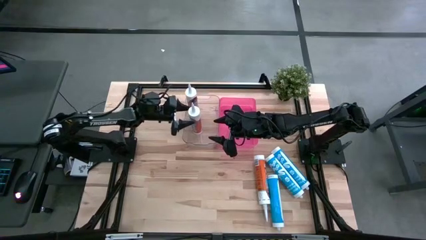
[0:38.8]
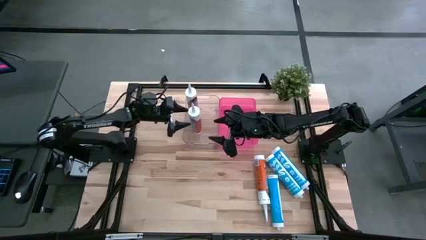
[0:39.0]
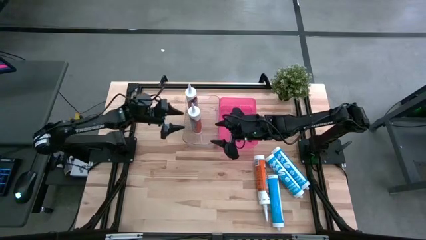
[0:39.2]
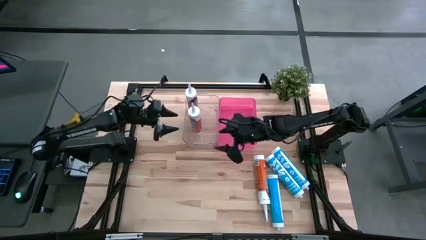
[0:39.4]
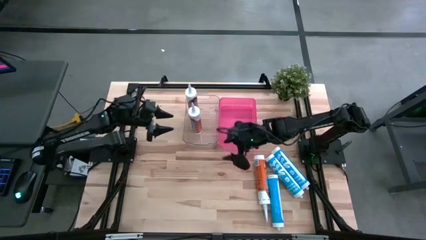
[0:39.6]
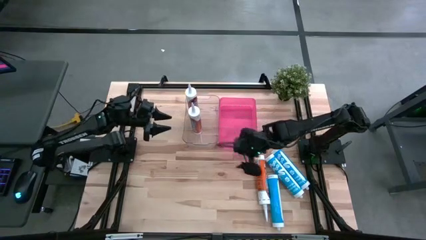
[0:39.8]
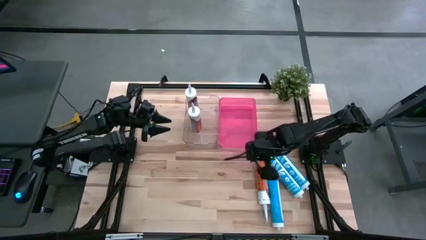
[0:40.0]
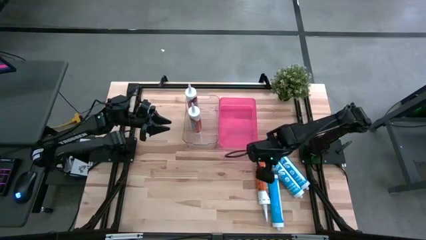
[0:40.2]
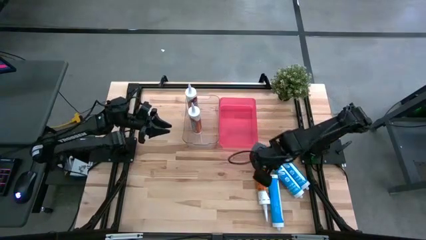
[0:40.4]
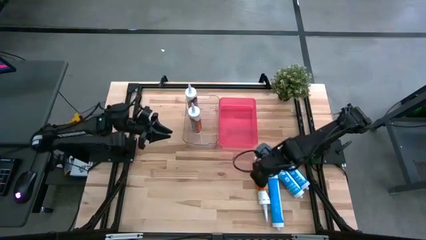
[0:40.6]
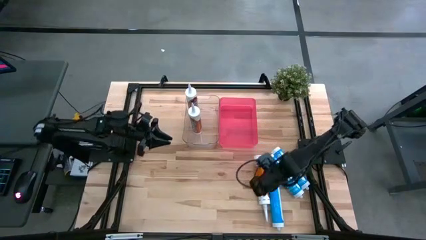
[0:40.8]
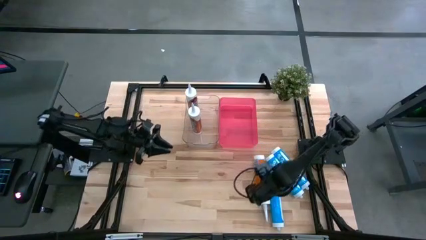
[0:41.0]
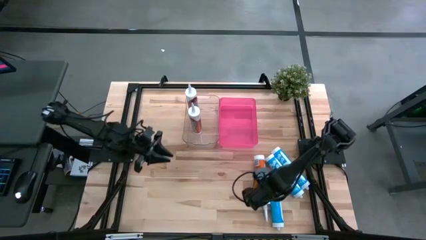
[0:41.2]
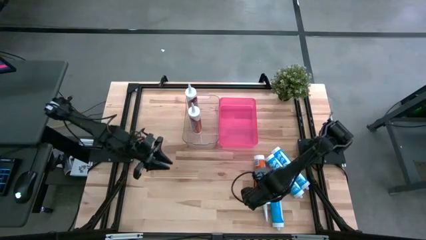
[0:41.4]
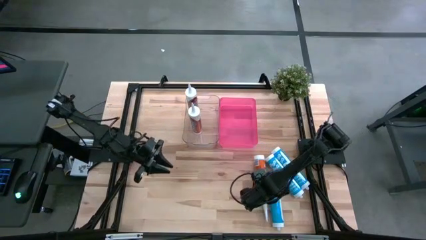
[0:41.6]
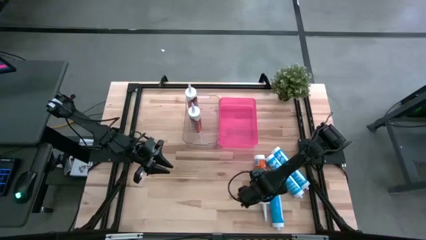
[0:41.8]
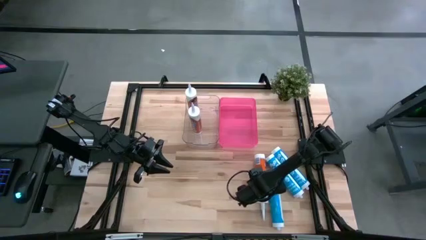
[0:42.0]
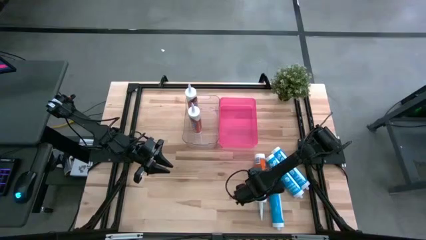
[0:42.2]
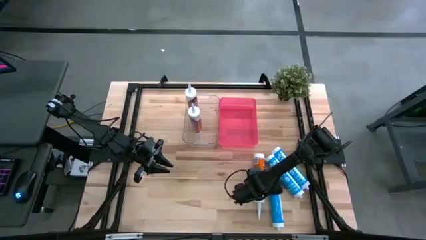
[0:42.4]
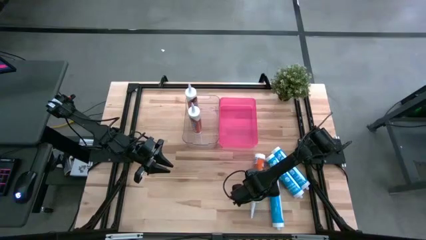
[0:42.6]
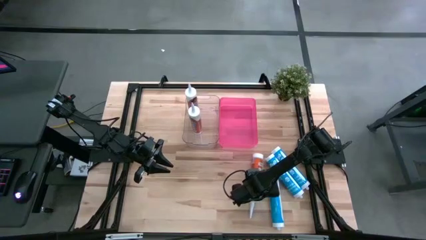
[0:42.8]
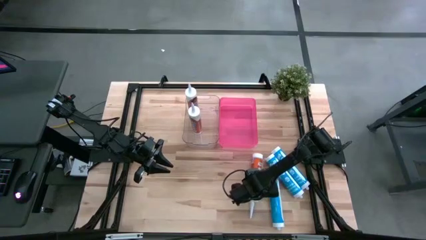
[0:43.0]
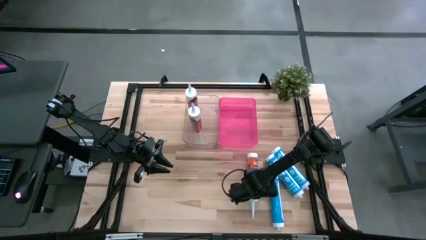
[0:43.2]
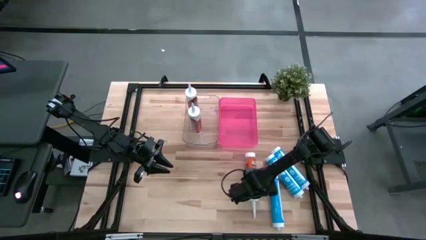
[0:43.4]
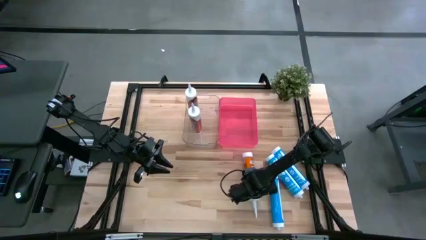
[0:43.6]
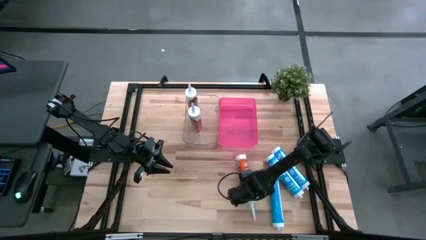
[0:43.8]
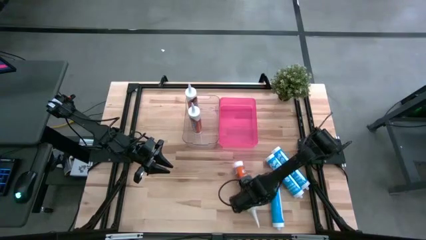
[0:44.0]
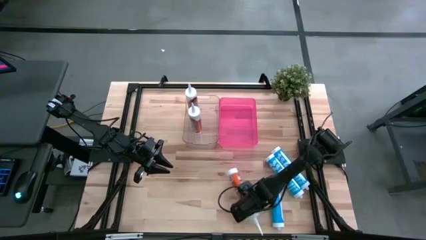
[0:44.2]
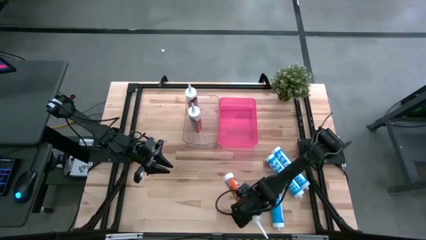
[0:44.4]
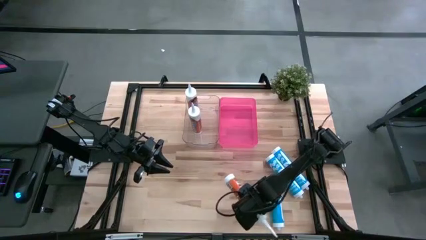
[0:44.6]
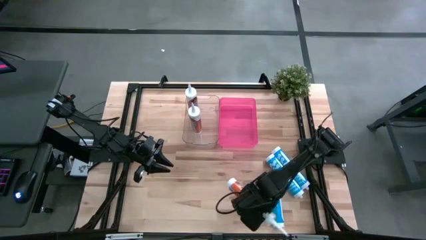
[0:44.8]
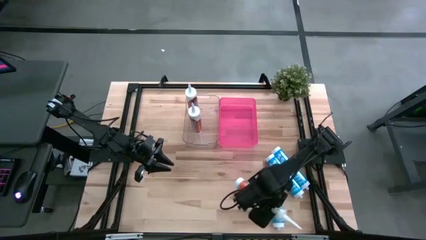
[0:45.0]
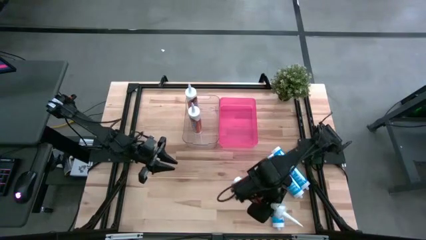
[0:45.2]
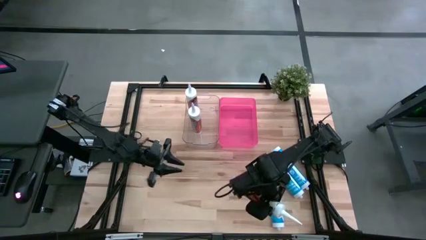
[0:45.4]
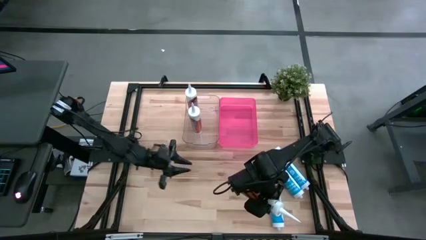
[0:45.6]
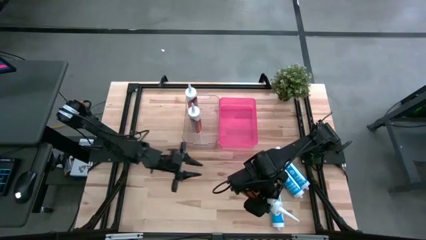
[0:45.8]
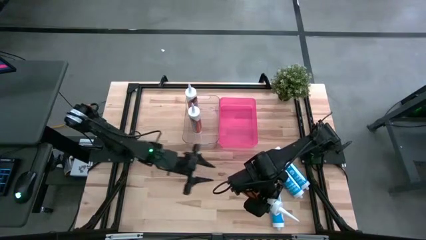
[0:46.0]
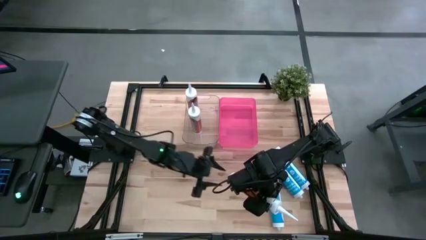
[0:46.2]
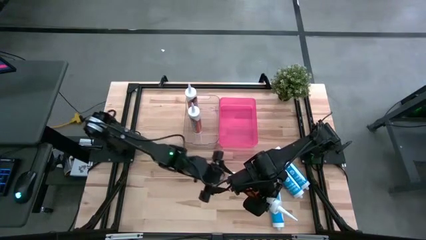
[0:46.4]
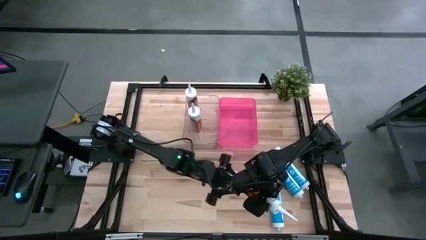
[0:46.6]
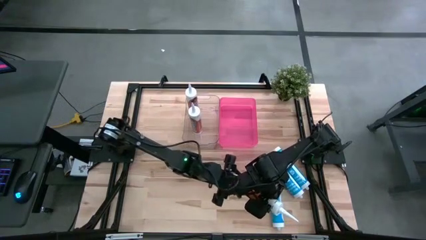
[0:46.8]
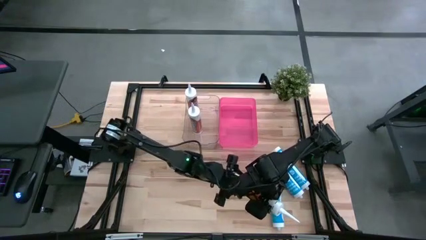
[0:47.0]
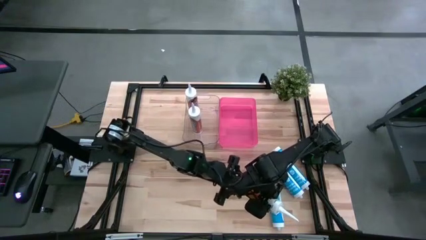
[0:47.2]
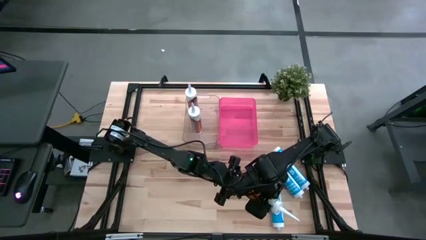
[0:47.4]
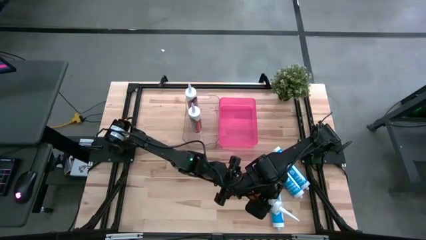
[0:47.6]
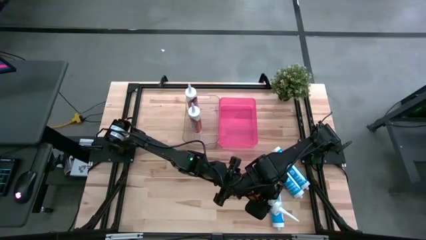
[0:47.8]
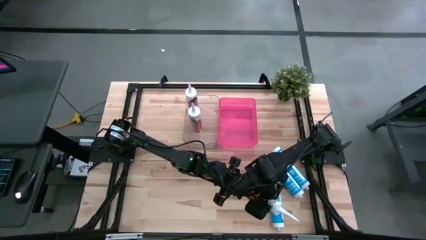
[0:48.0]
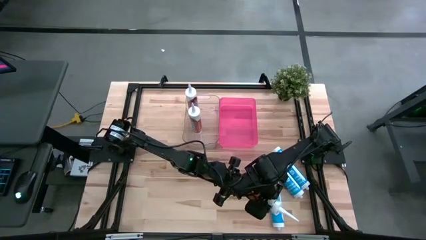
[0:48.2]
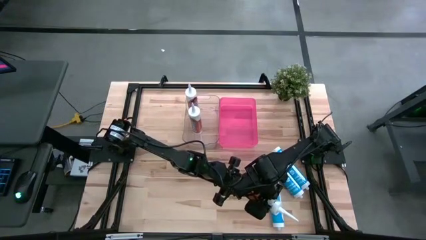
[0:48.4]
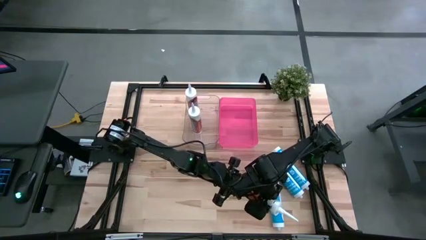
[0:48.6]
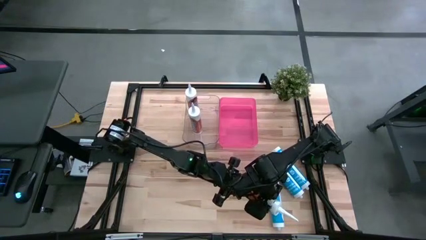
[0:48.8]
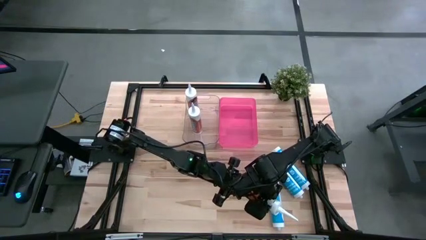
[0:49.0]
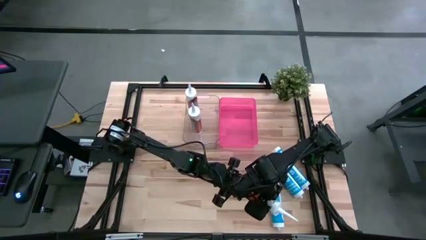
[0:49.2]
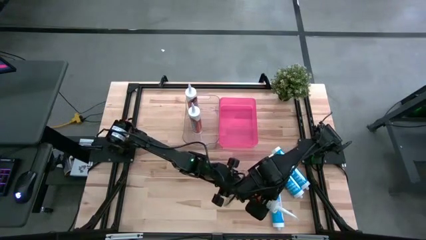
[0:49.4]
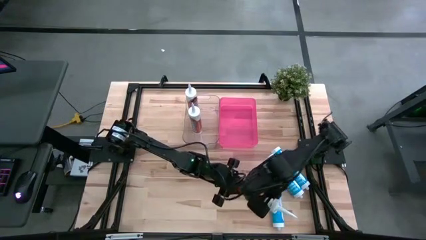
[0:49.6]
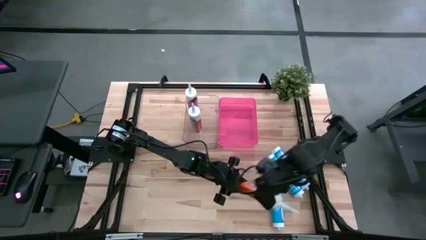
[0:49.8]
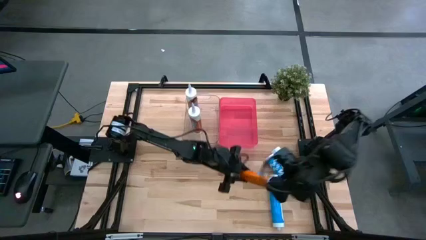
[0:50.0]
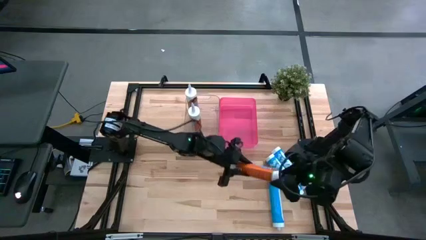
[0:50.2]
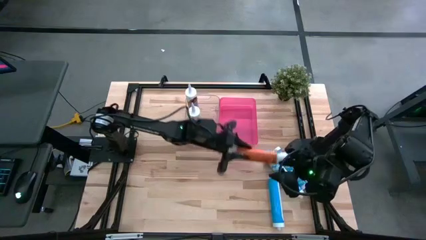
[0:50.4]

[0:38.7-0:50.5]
Task: Pick & place silicon tubes, Sealant and Lysol wipes
Put the orange sealant into the transparent bin

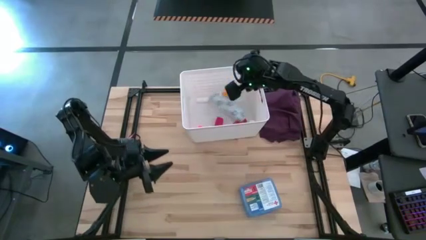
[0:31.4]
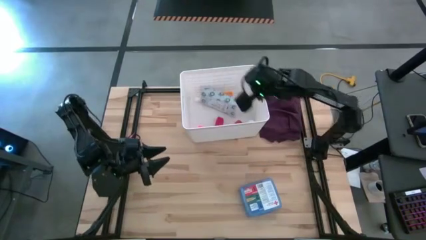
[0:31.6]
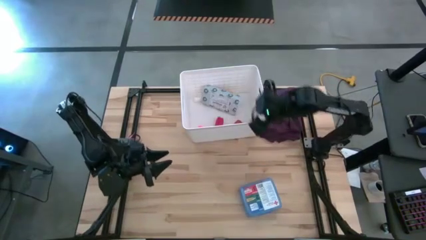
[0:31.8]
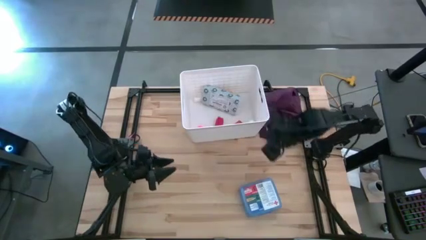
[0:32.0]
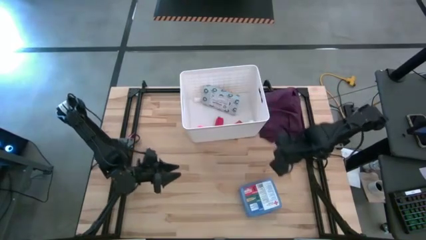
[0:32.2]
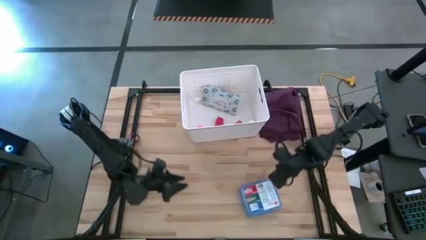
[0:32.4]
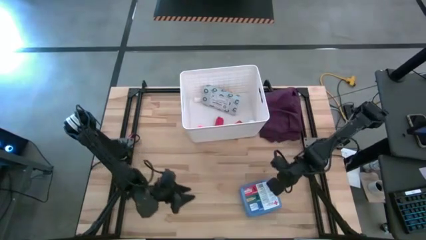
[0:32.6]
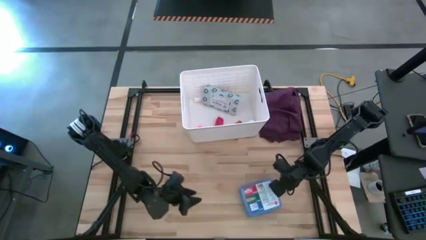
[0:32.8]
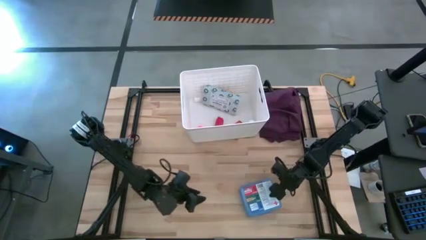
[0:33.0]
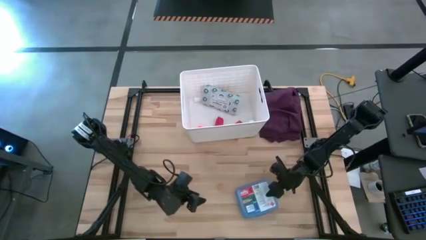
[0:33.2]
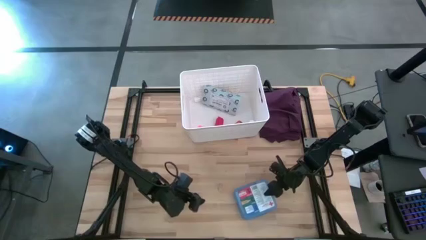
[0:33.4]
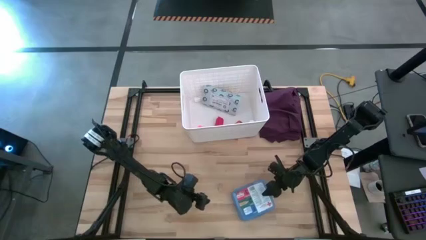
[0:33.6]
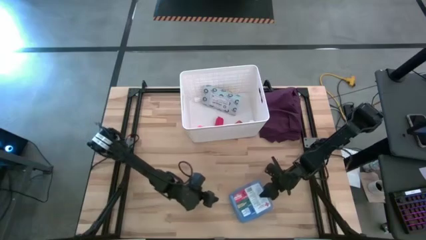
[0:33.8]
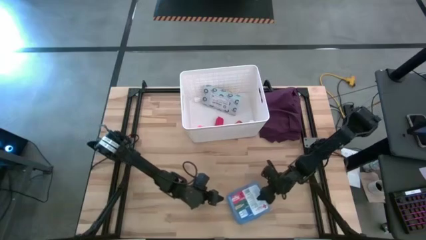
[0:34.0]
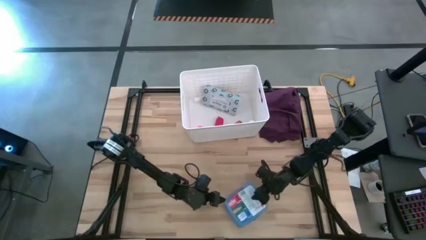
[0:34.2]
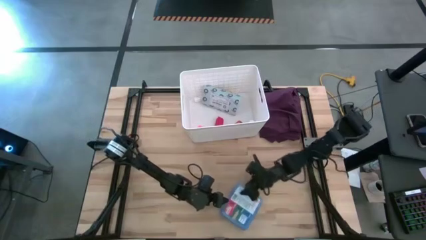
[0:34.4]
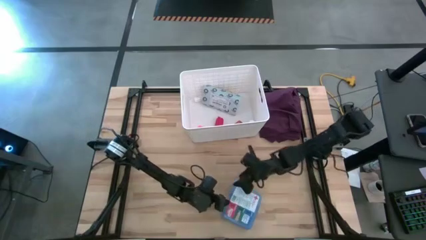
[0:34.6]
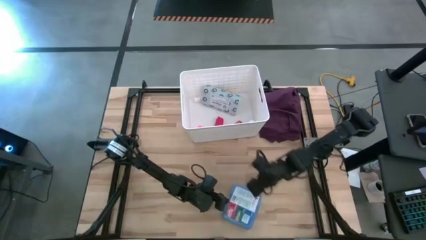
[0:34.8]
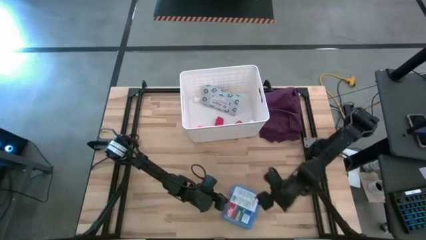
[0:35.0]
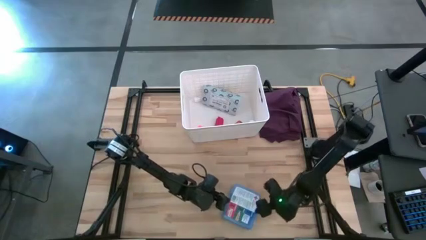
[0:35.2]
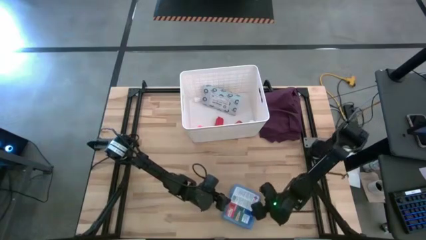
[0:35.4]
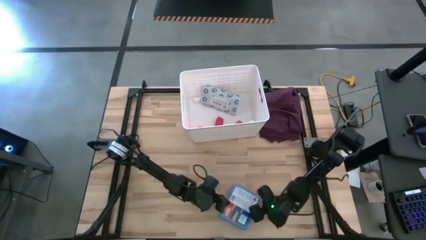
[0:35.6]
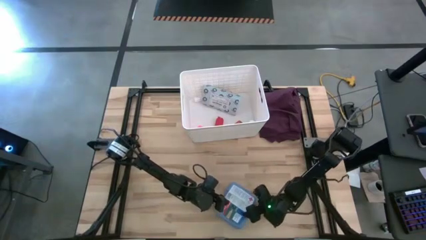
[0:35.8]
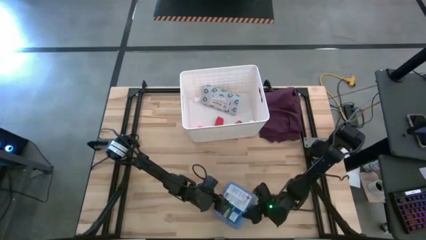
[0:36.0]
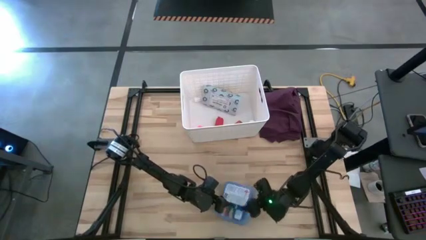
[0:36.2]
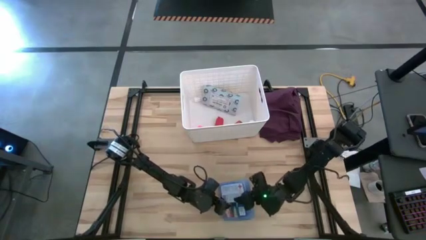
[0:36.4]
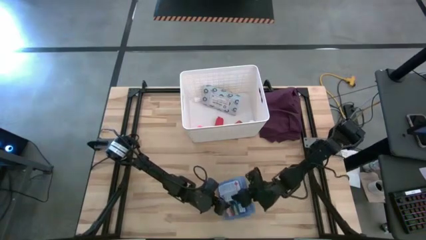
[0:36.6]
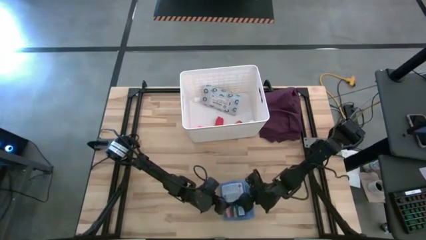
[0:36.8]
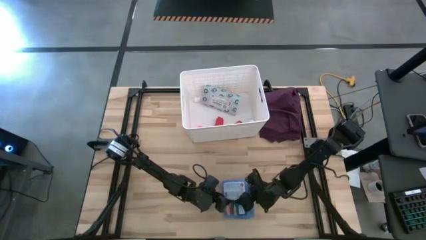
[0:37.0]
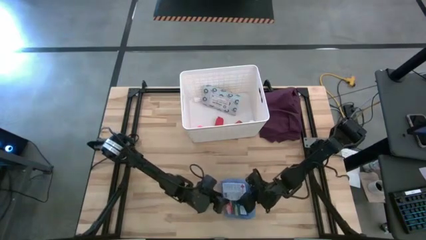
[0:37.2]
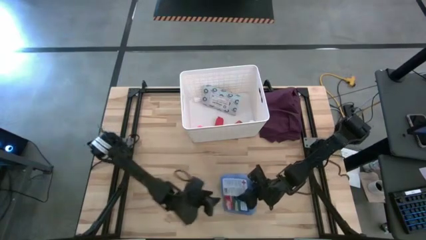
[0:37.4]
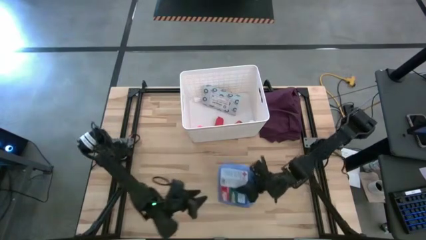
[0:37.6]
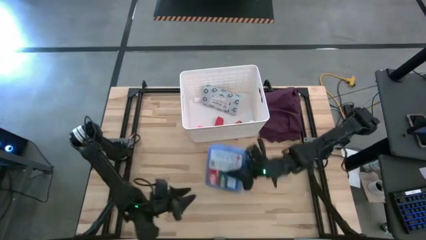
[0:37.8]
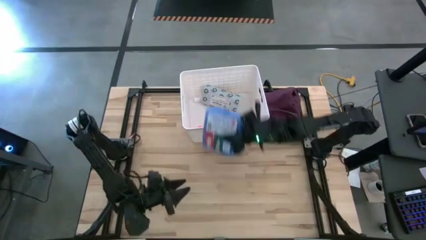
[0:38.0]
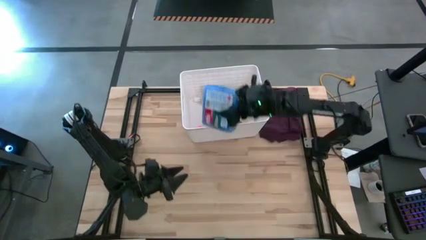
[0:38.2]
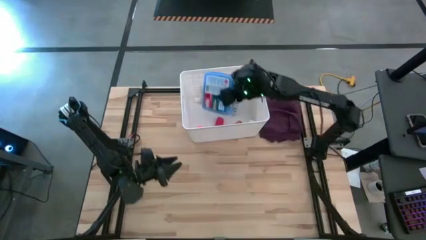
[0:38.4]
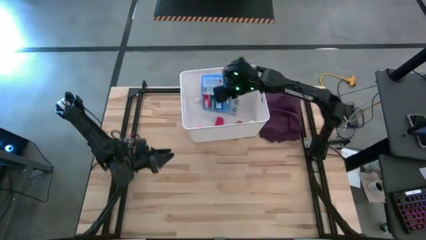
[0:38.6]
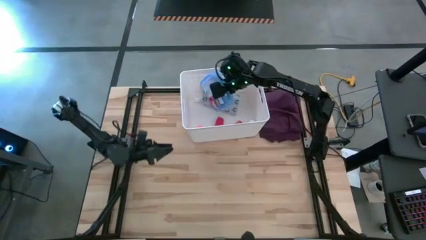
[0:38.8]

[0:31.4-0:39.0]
Task: Pick & place medical supplies in basket/bin
Put the first aid kit into the white bin
